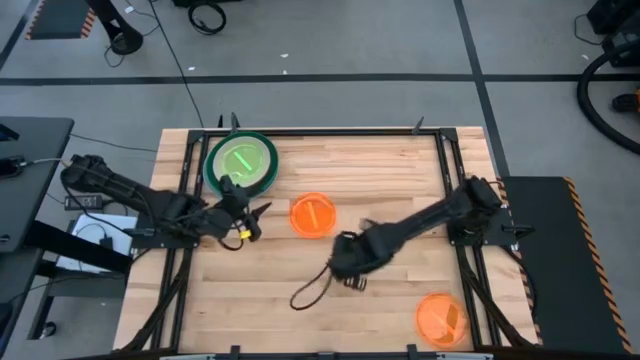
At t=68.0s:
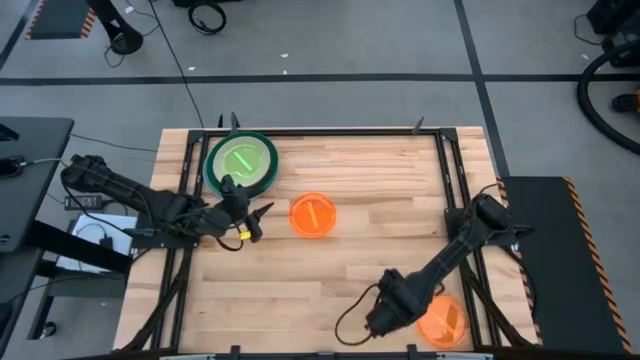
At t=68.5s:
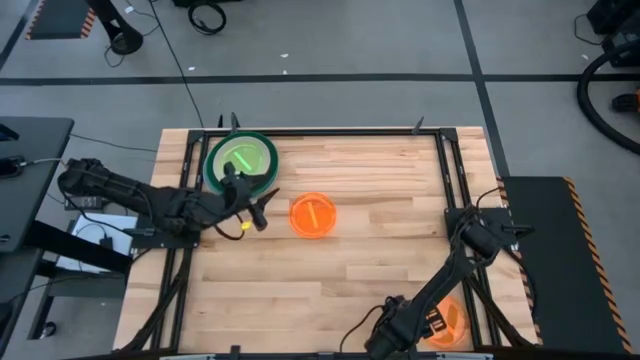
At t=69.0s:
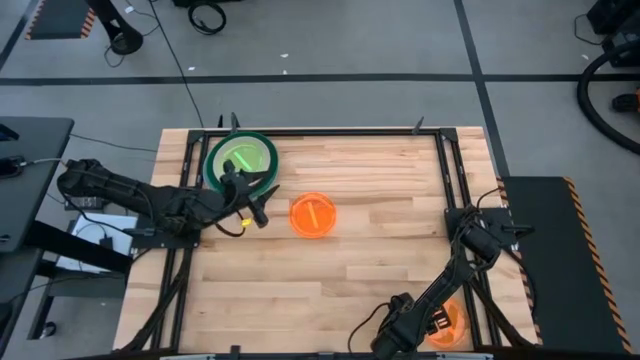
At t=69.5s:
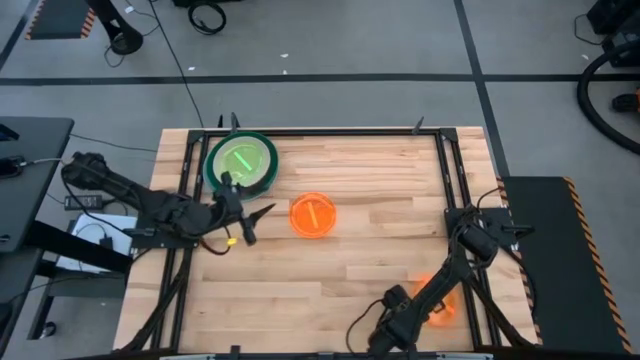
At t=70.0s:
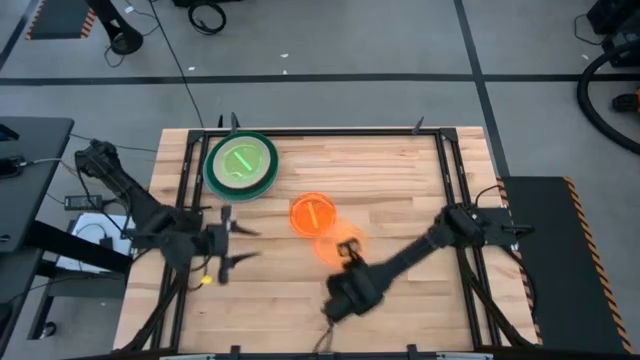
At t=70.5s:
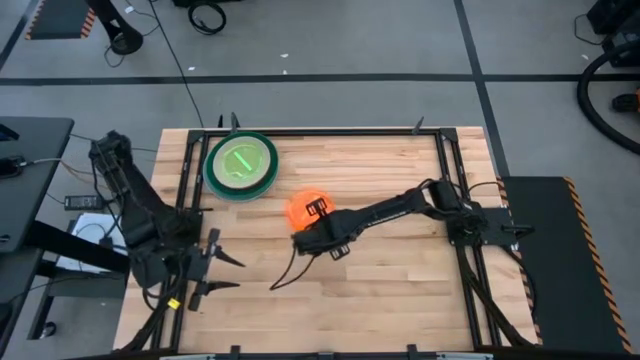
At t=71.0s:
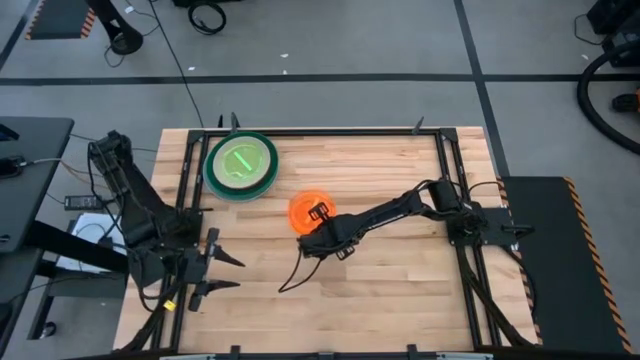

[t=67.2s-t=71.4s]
Task: Stack plastic plates
Stack the light orange plate on top of the light orange plate

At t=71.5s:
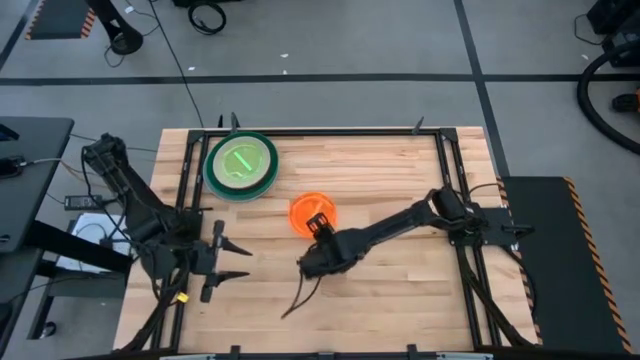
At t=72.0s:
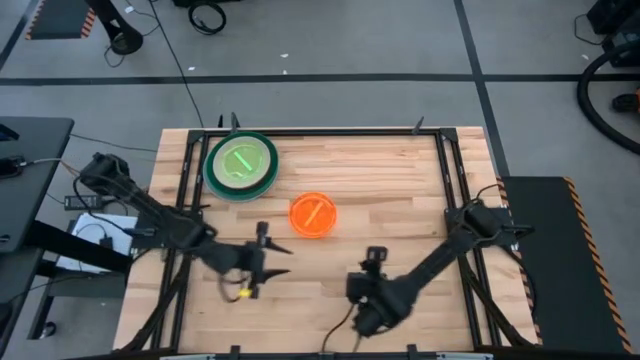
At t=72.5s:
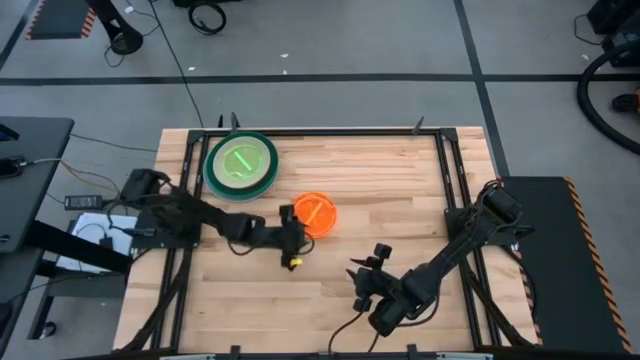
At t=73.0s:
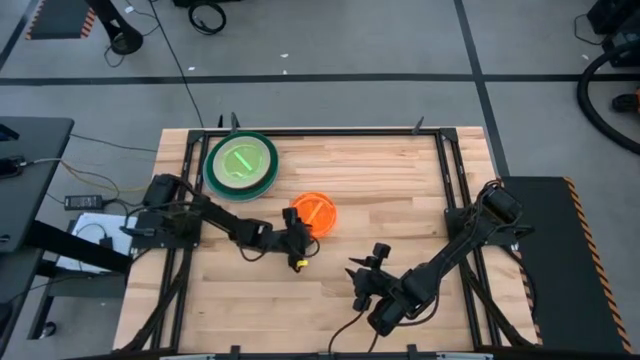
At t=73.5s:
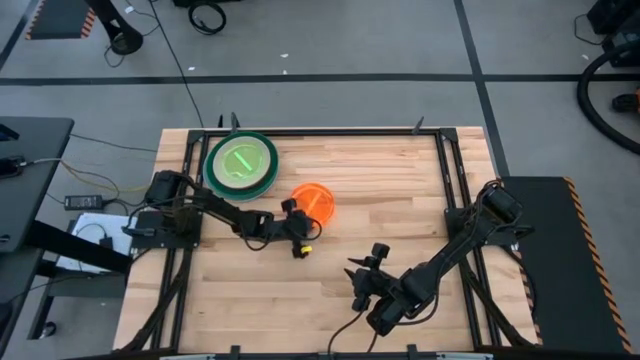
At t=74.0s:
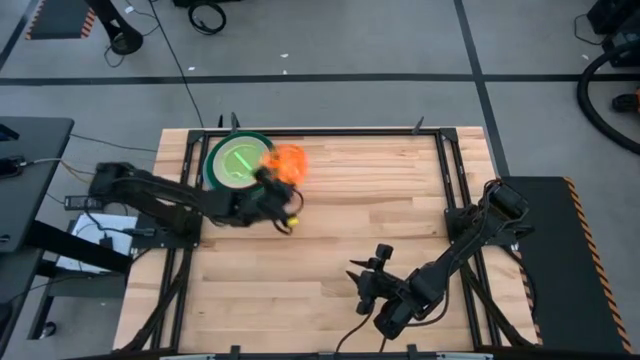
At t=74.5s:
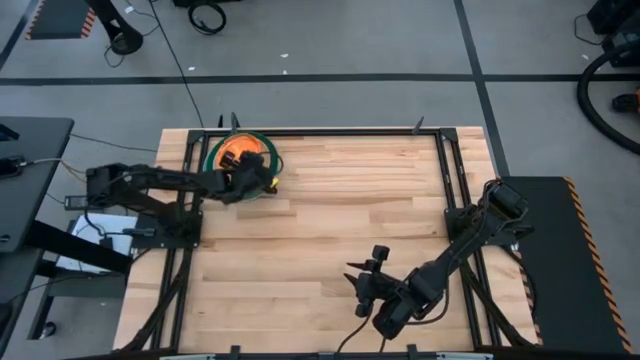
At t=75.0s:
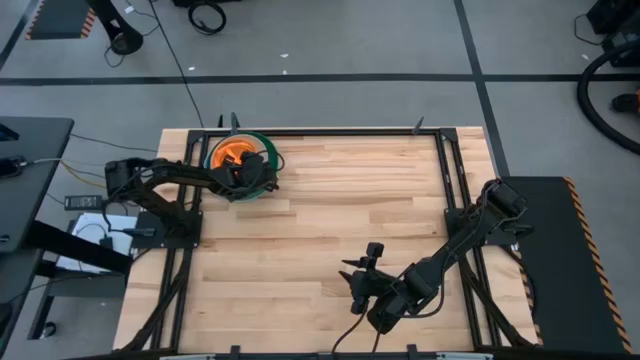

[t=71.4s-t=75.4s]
Stack the light orange plates on top of the light green plate

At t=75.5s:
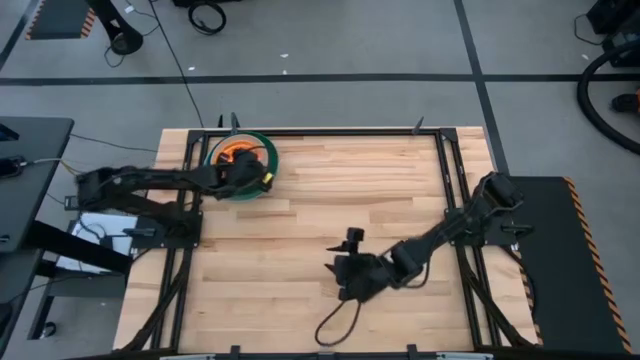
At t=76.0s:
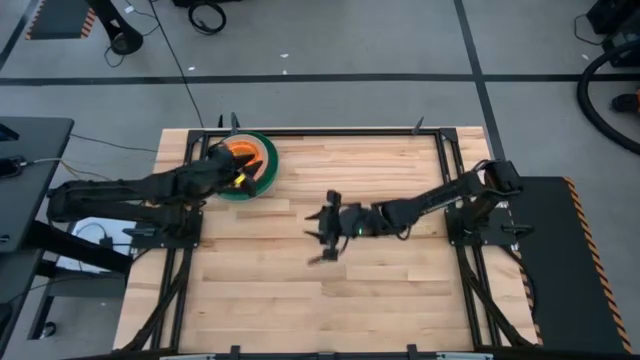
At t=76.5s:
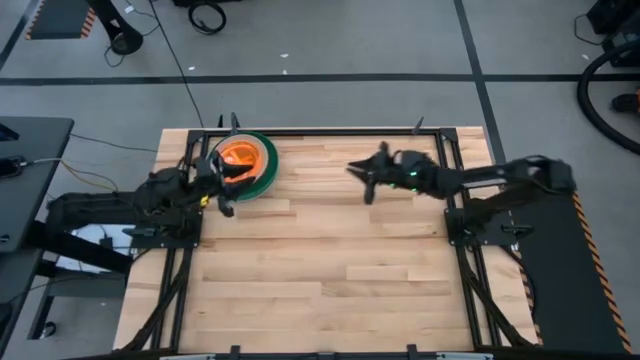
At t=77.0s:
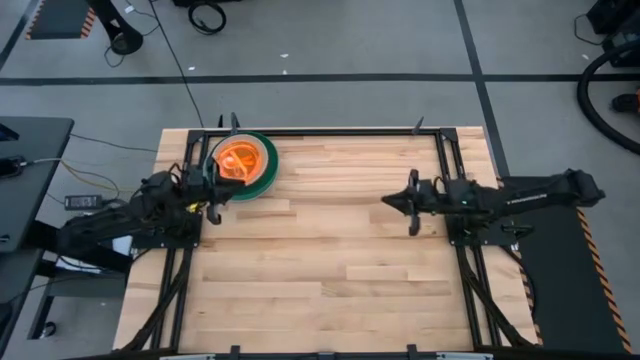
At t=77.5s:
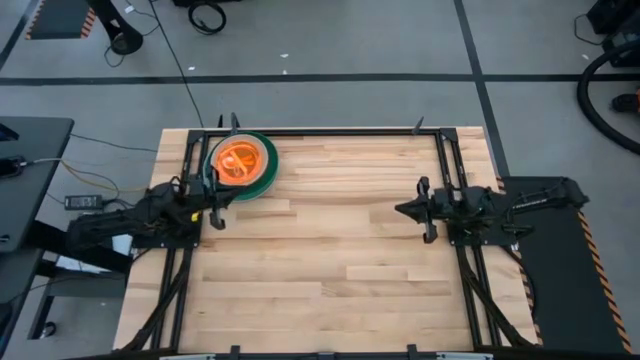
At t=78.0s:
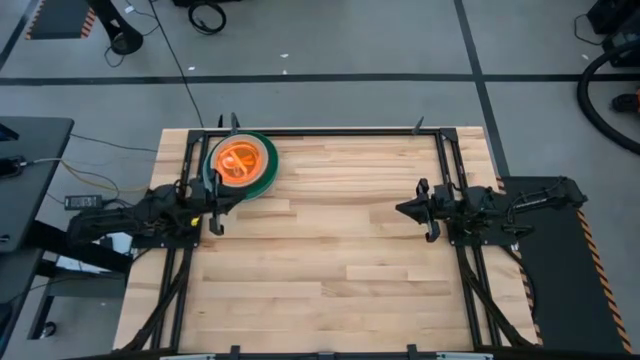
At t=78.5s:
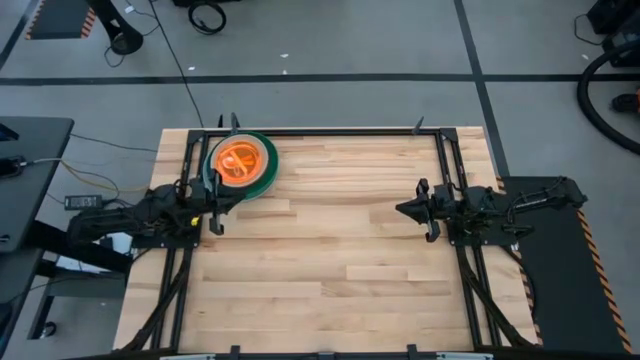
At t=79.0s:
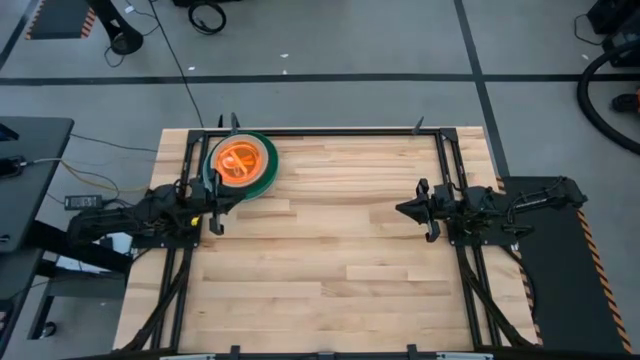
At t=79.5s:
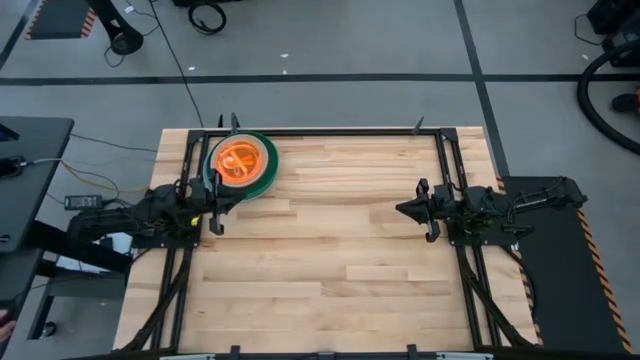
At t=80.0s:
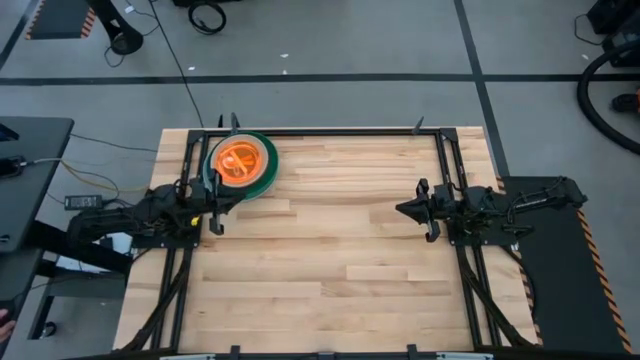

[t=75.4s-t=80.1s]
Return to Home Position
